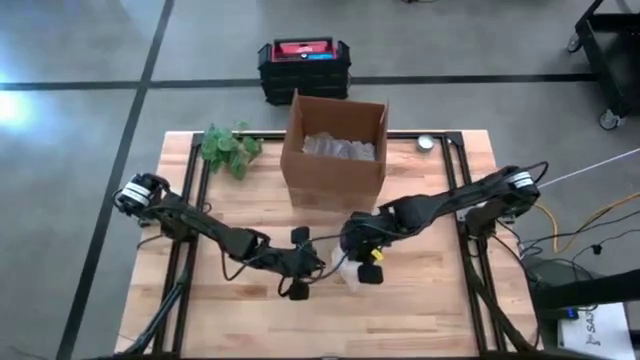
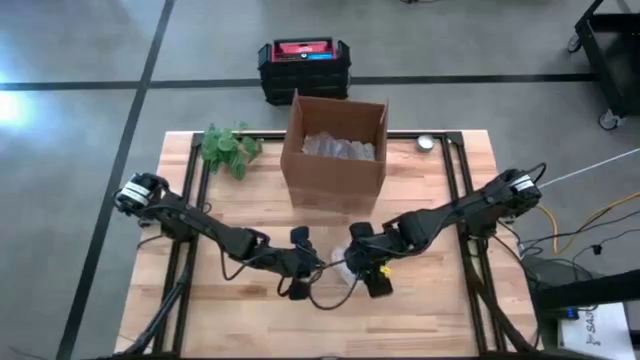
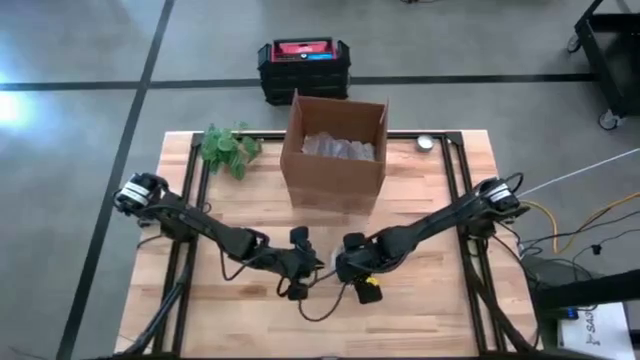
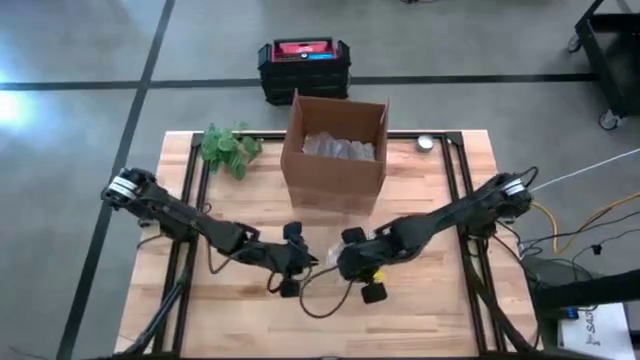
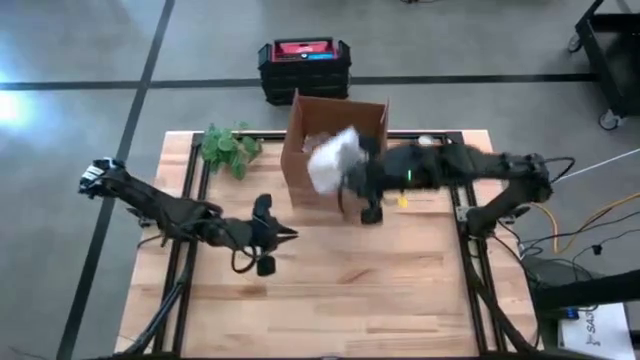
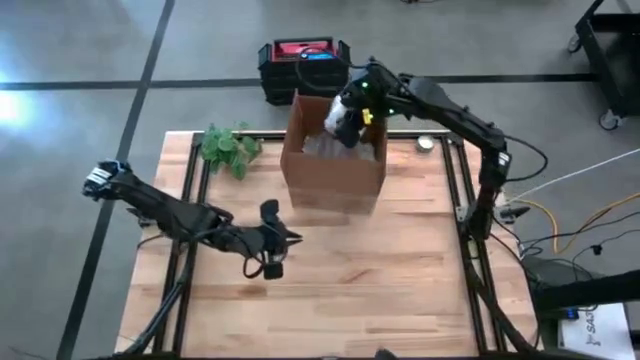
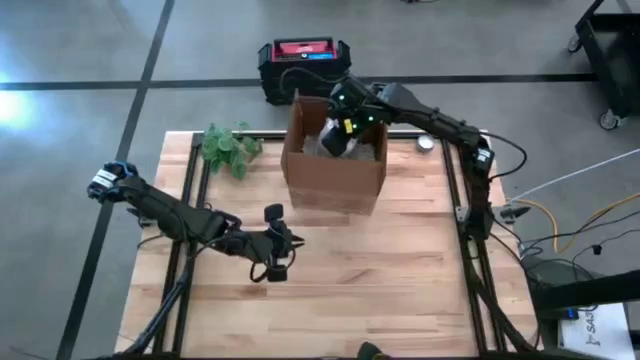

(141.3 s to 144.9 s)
Task: wrap mug
Put the wrapped yellow cup into the cardboard box

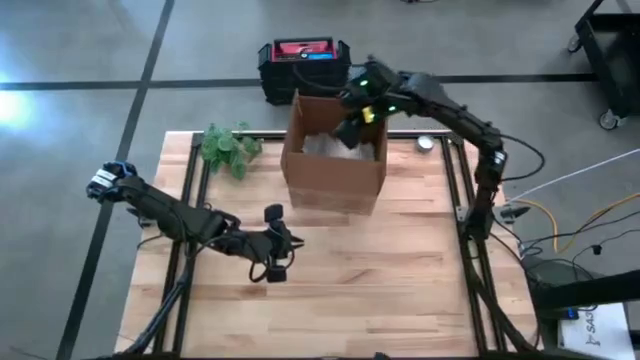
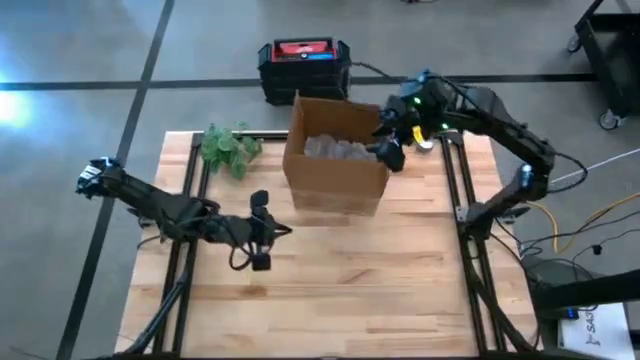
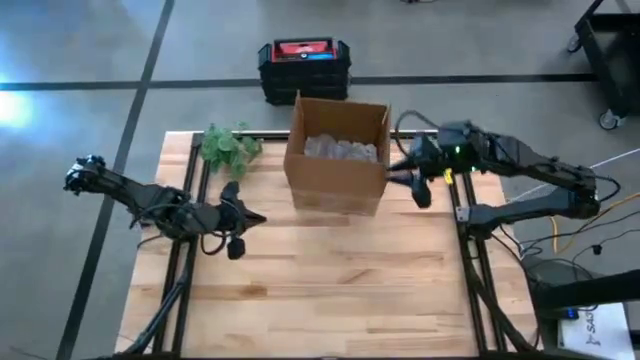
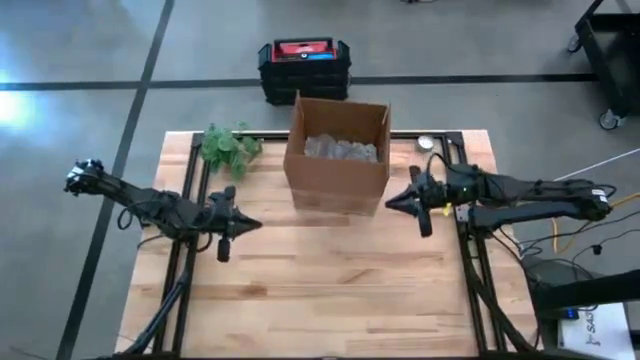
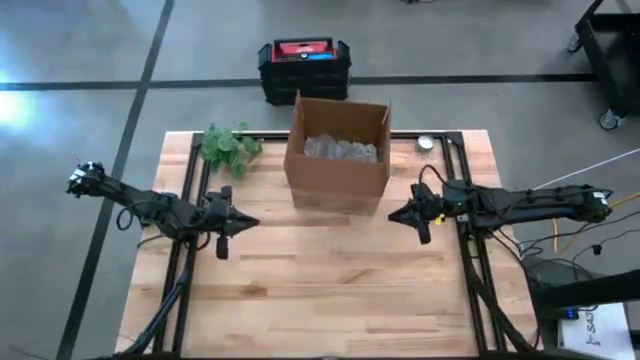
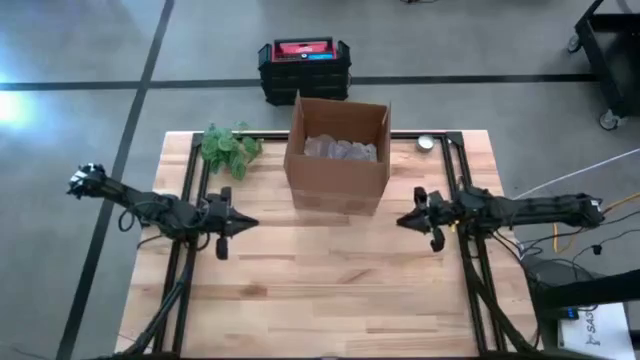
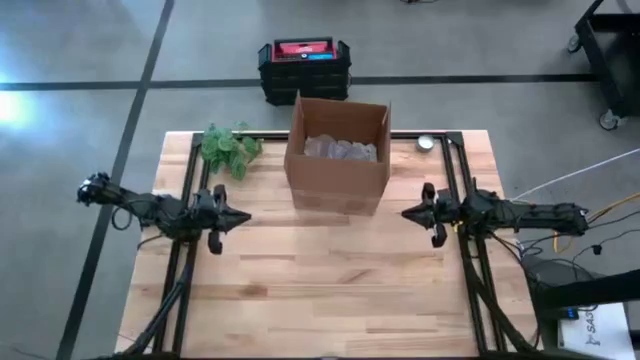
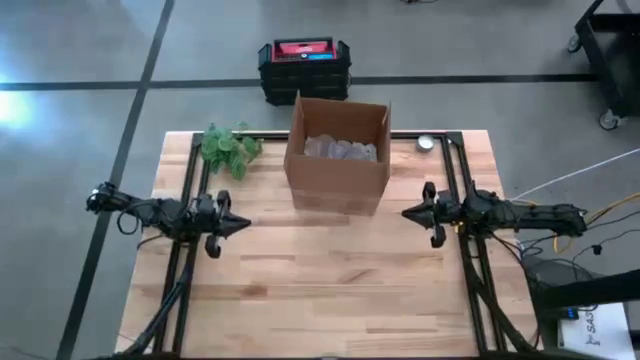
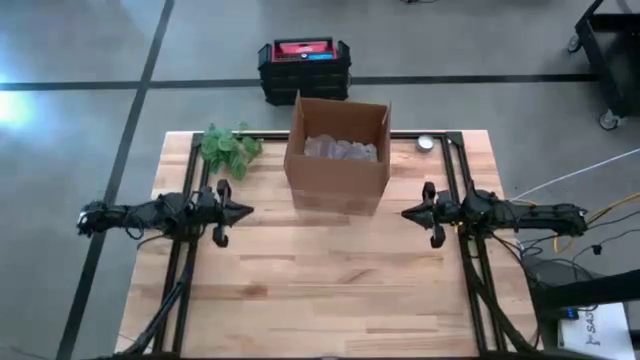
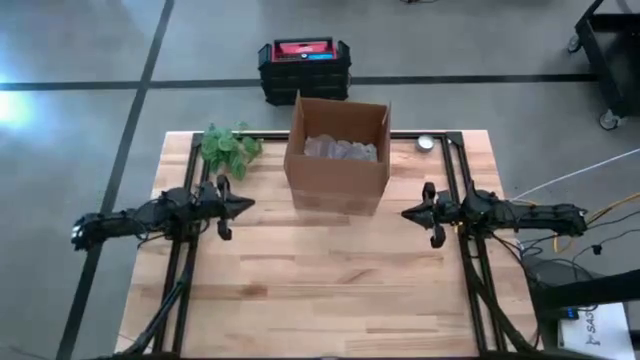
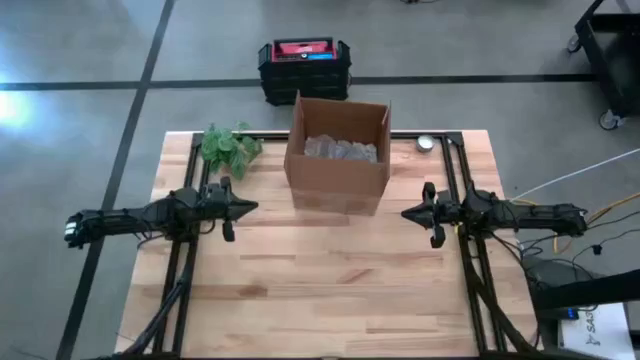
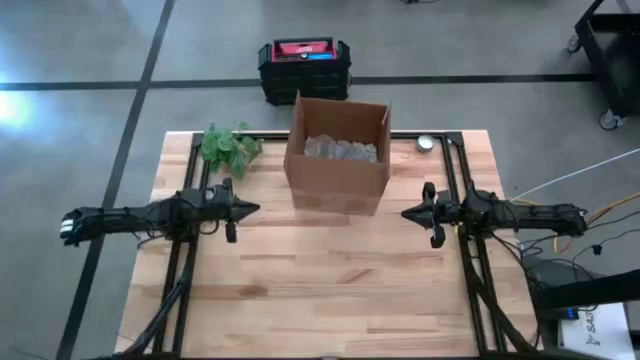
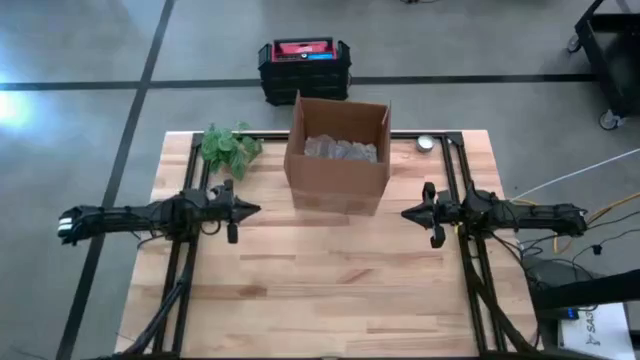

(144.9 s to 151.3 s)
Return to Home Position

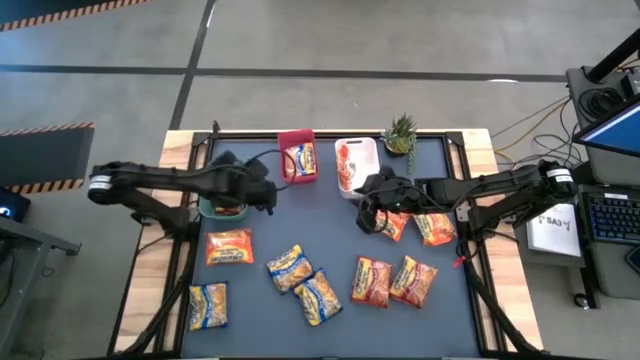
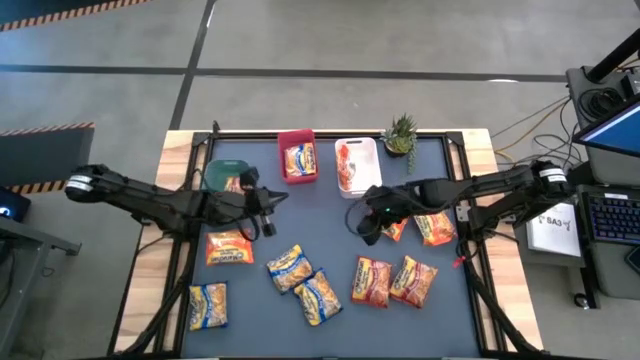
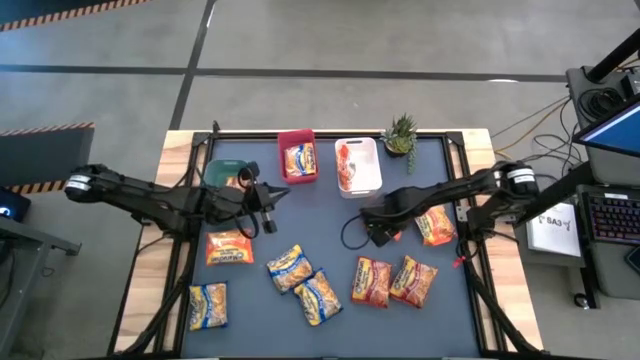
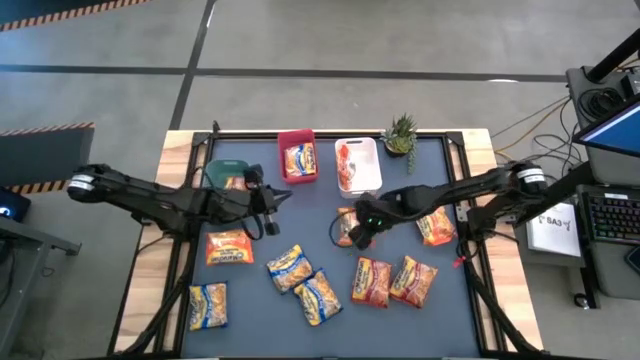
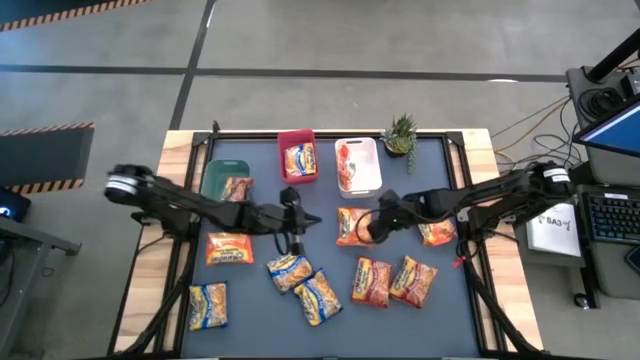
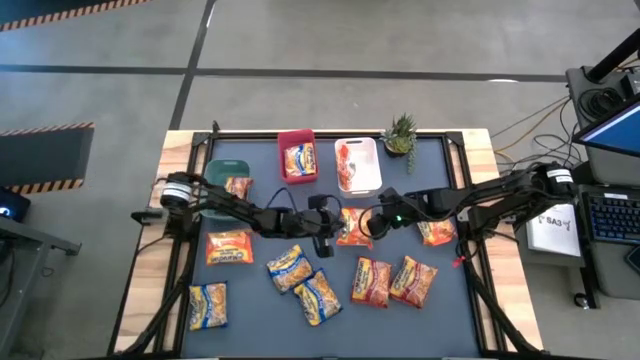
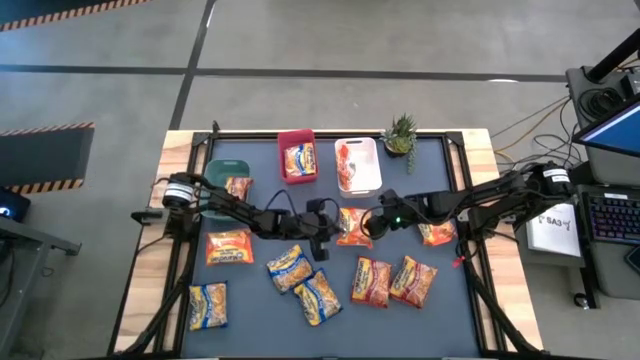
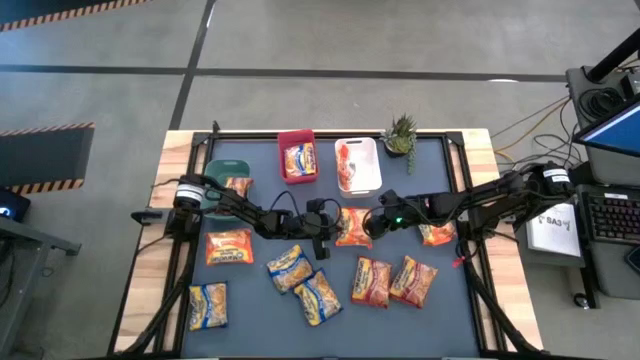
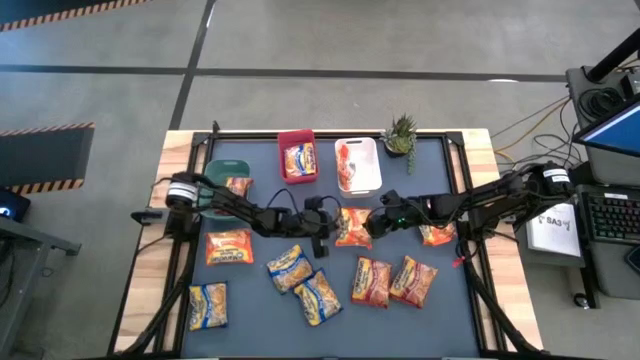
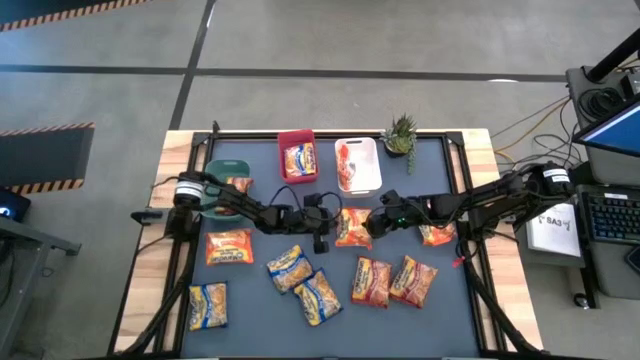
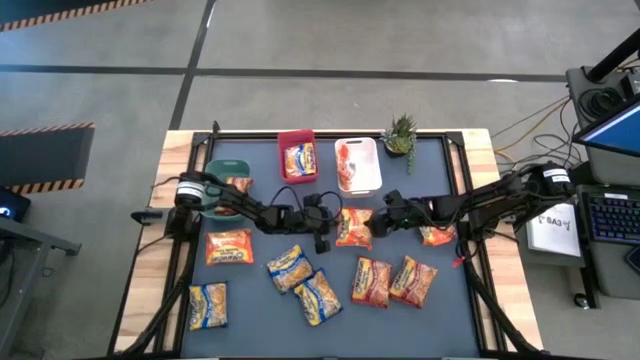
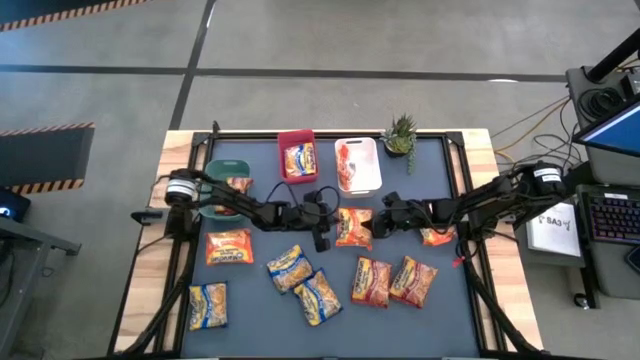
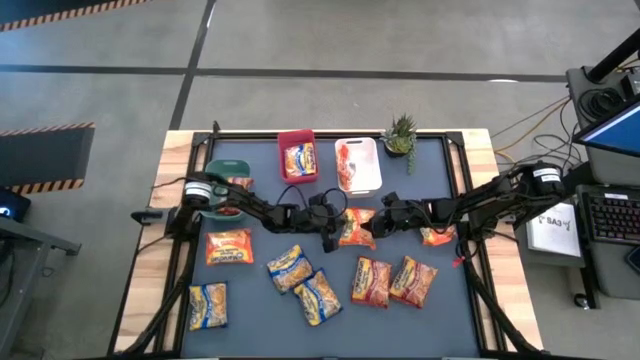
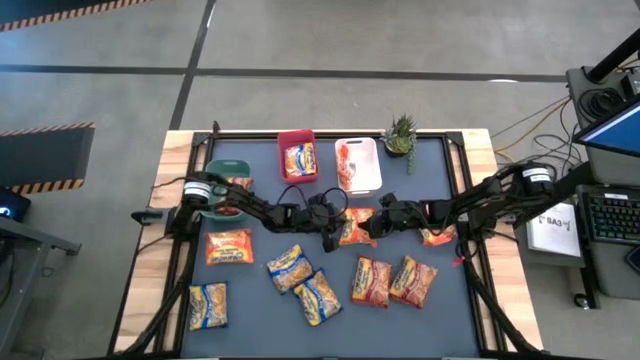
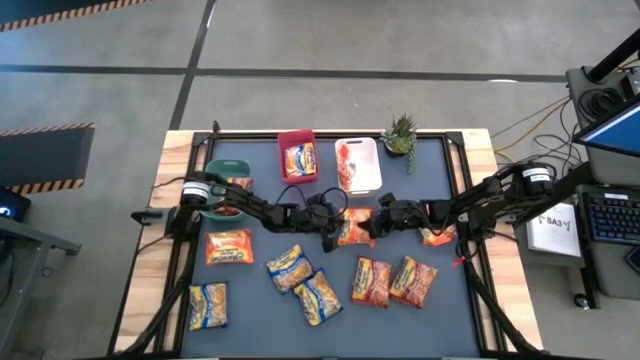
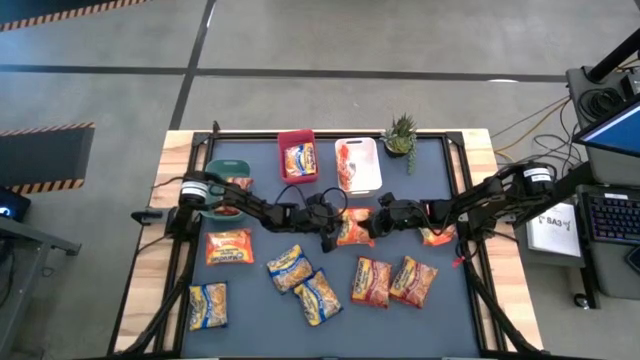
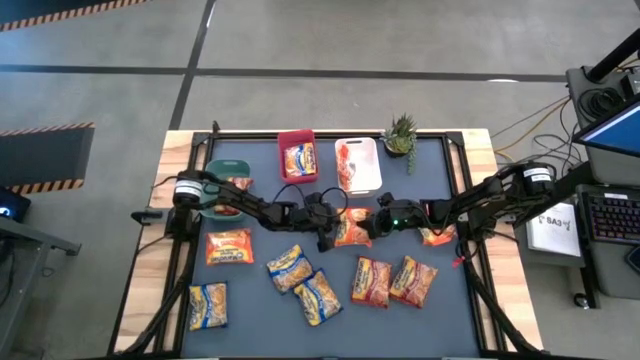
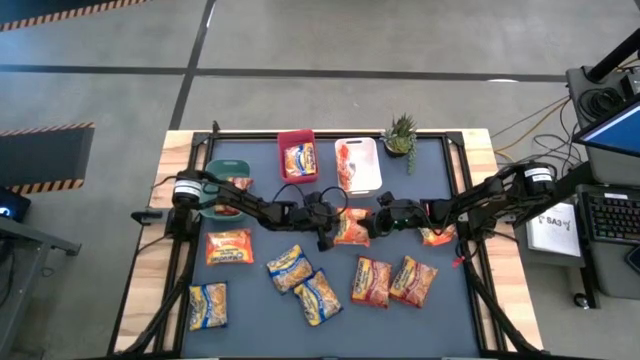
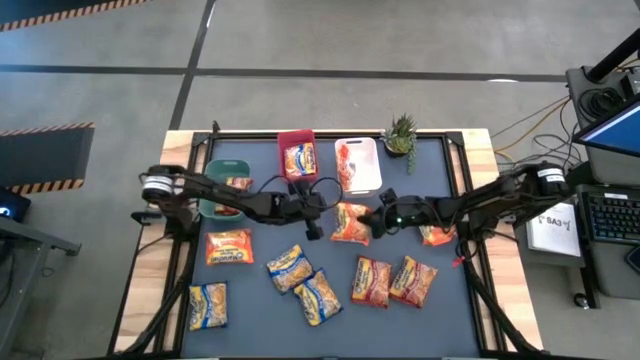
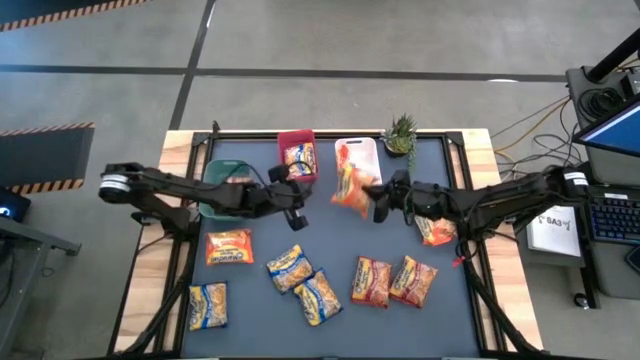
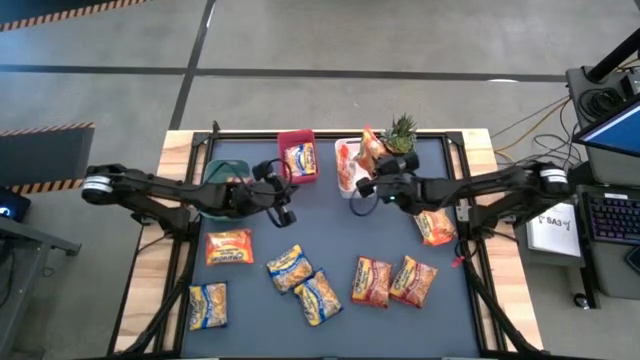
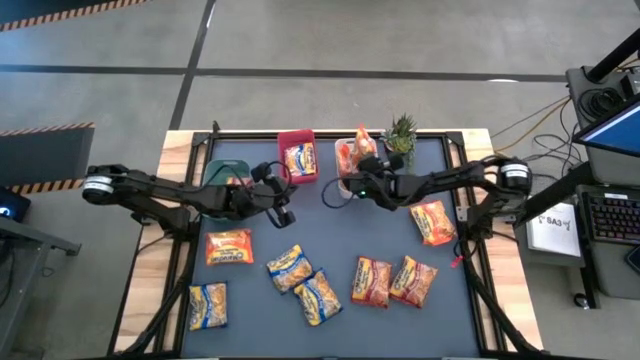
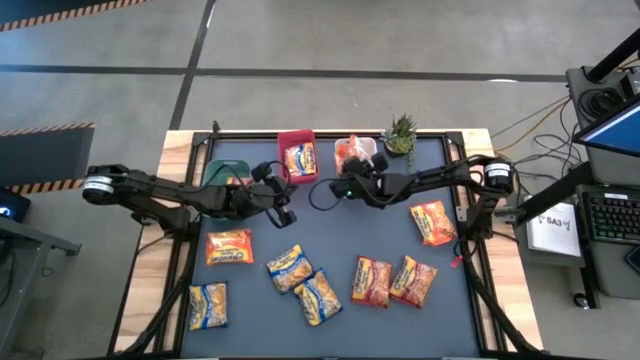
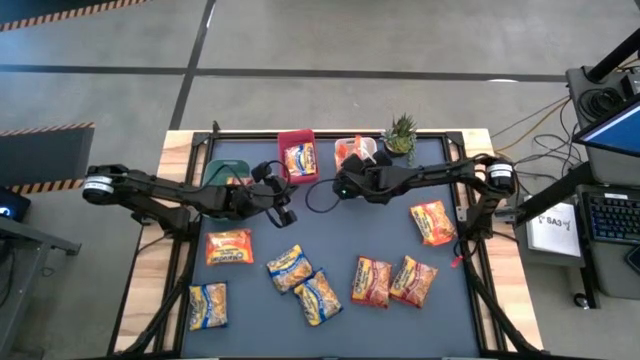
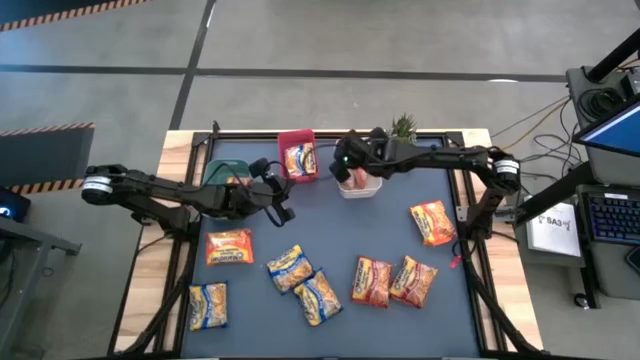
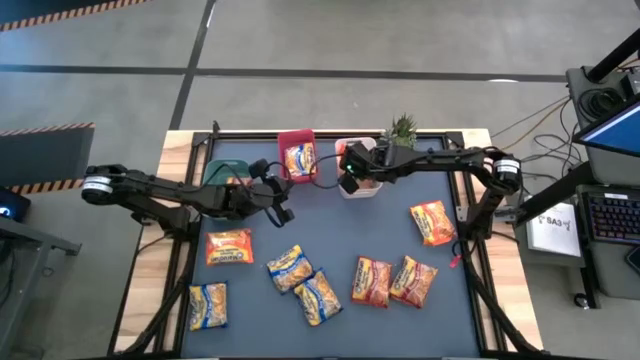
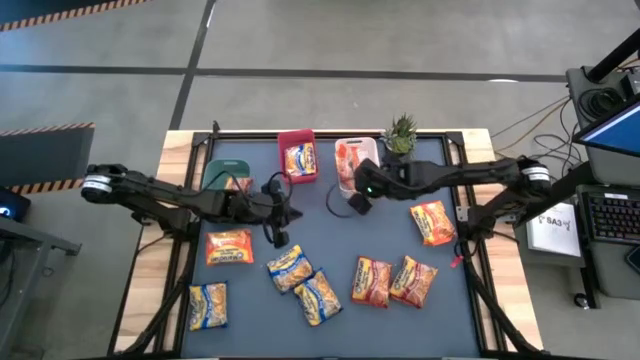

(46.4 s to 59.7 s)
Task: Sort Maruchan noodles
Put the middle orange noodle pack into the white bin
